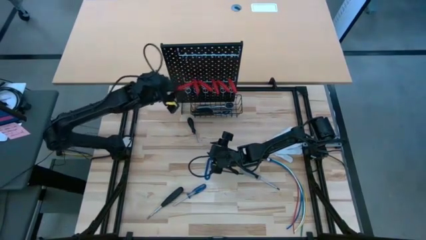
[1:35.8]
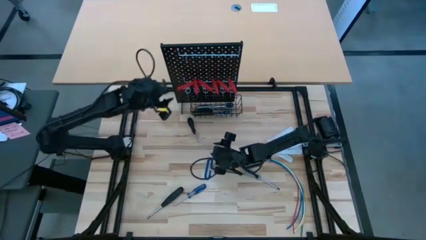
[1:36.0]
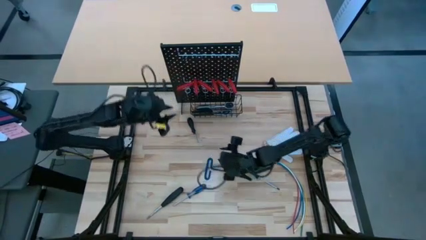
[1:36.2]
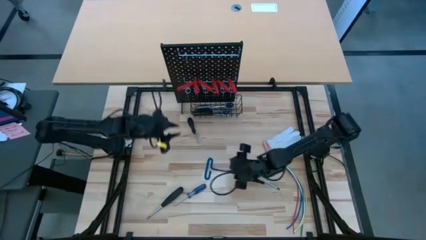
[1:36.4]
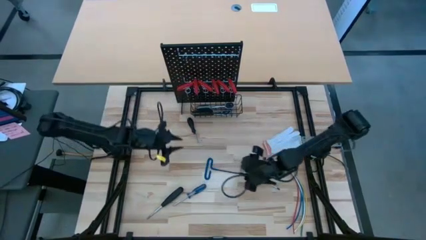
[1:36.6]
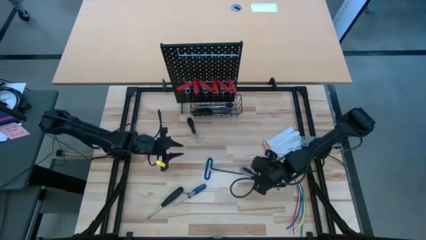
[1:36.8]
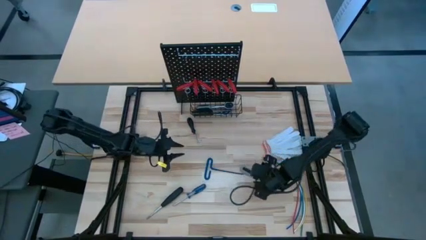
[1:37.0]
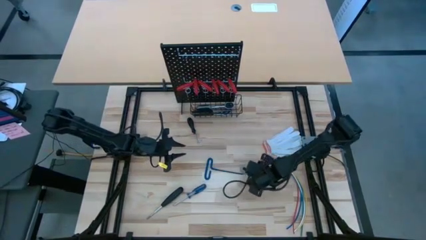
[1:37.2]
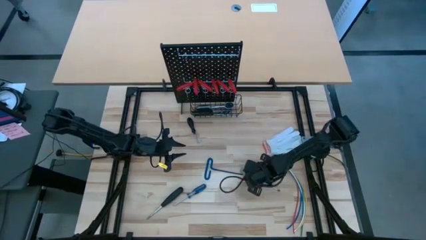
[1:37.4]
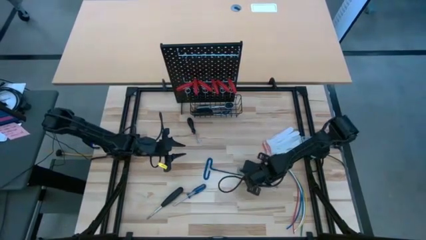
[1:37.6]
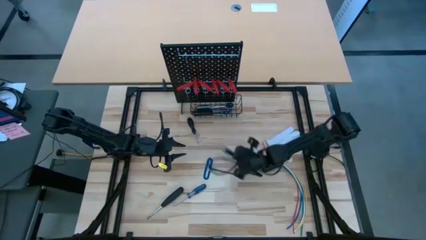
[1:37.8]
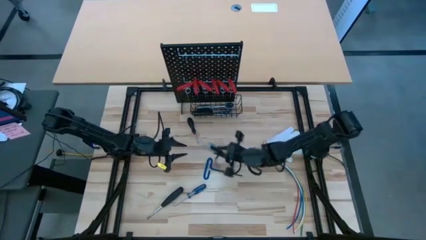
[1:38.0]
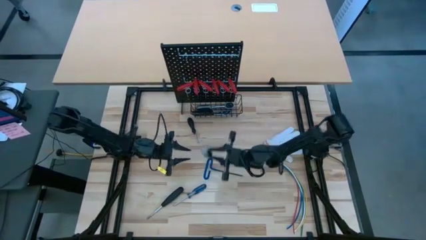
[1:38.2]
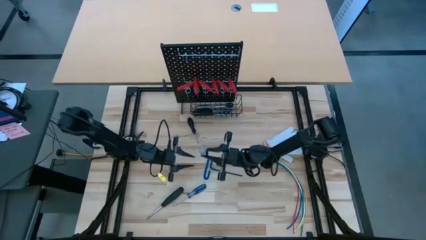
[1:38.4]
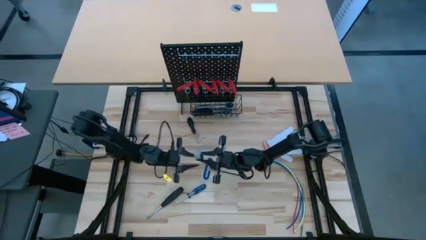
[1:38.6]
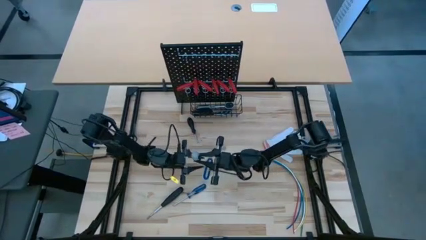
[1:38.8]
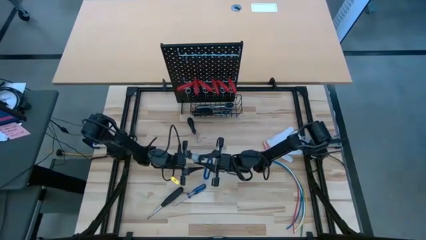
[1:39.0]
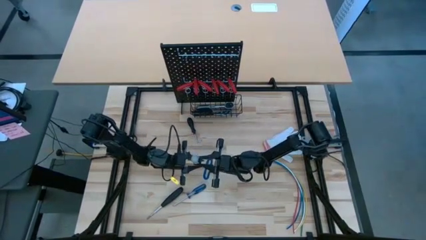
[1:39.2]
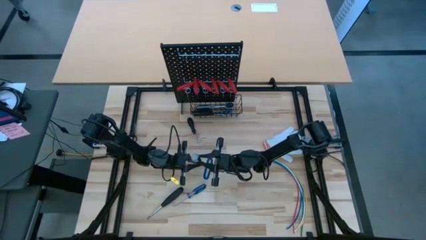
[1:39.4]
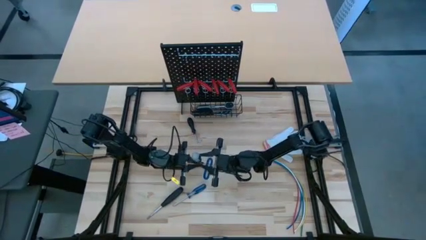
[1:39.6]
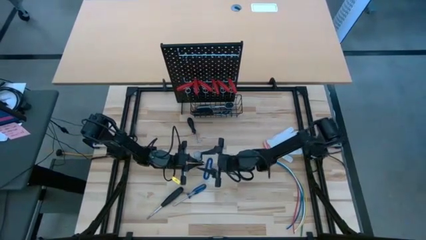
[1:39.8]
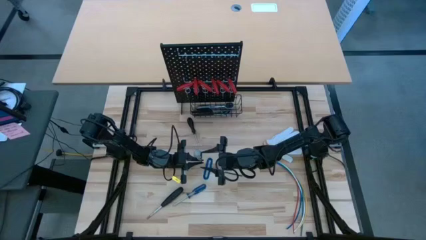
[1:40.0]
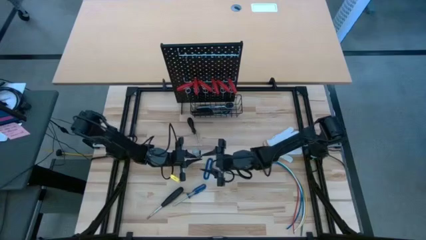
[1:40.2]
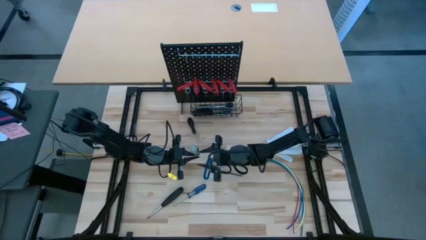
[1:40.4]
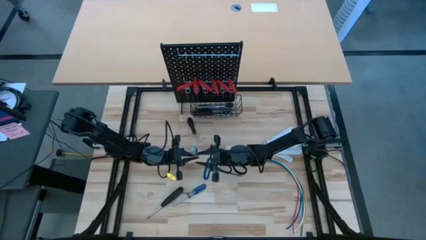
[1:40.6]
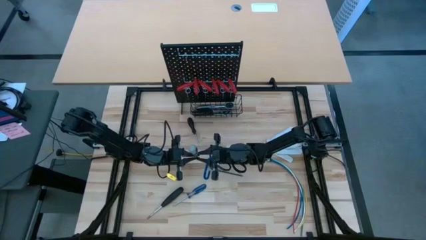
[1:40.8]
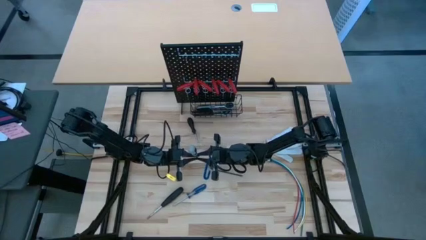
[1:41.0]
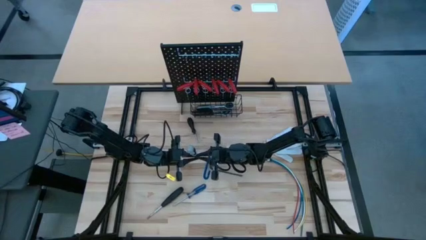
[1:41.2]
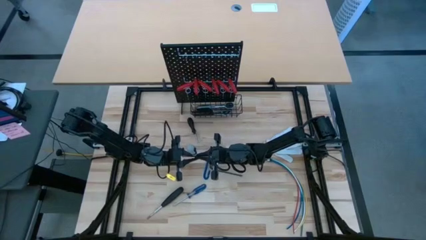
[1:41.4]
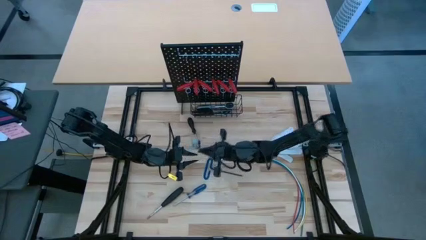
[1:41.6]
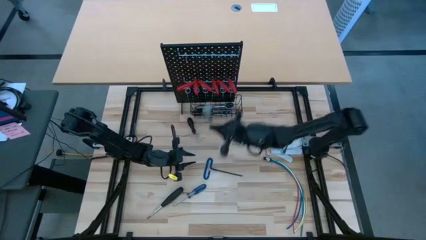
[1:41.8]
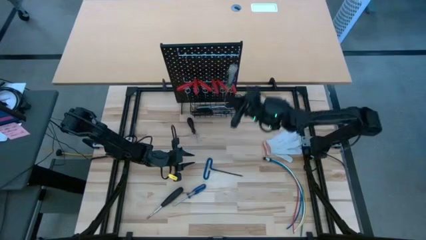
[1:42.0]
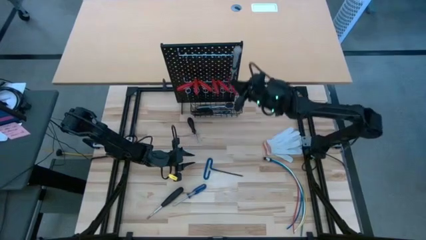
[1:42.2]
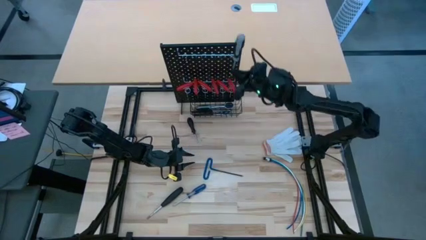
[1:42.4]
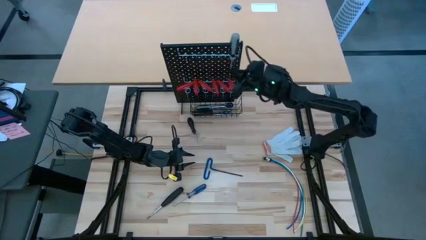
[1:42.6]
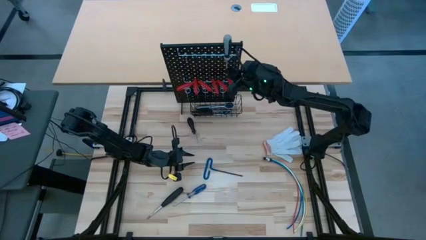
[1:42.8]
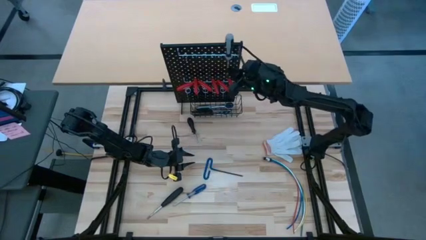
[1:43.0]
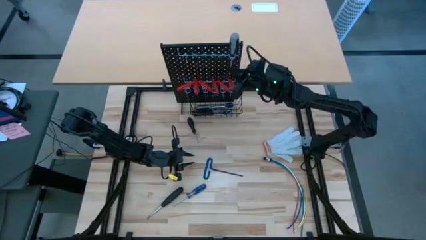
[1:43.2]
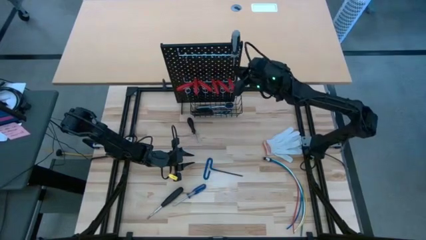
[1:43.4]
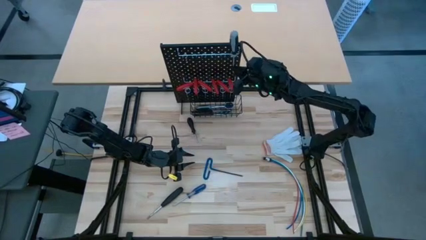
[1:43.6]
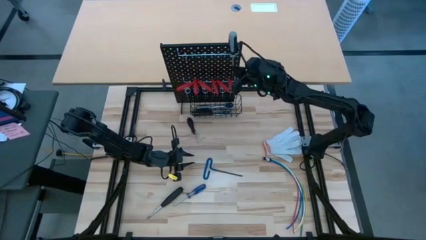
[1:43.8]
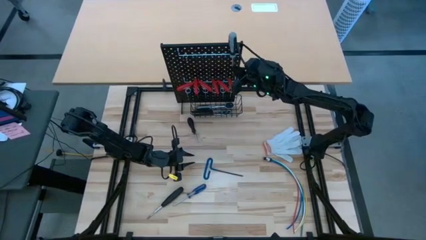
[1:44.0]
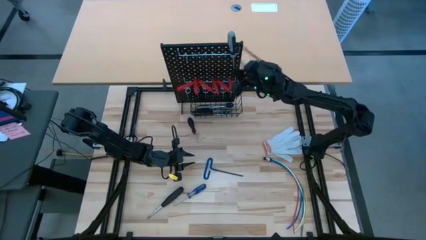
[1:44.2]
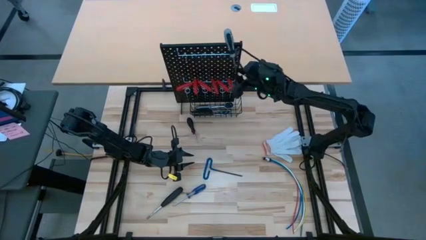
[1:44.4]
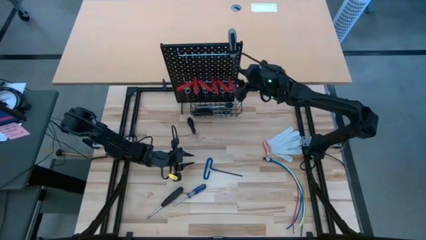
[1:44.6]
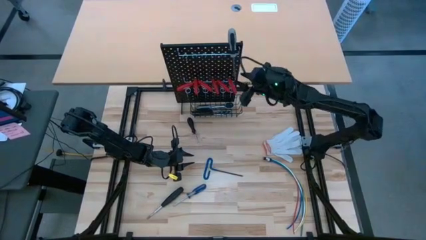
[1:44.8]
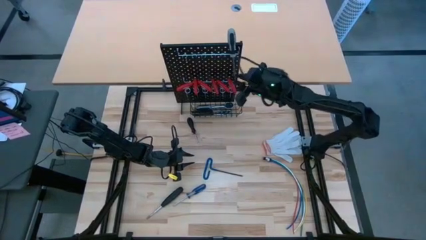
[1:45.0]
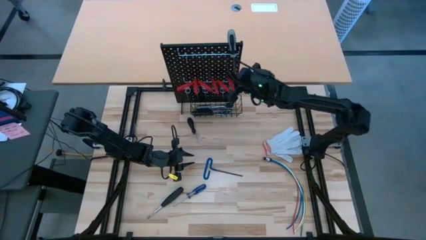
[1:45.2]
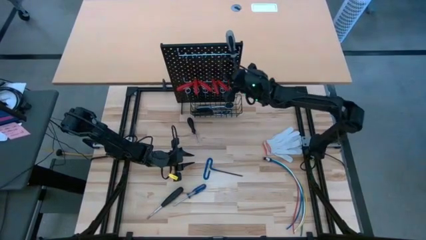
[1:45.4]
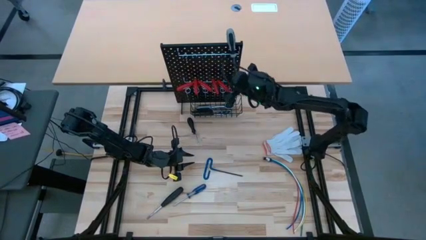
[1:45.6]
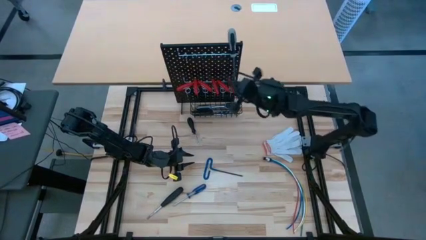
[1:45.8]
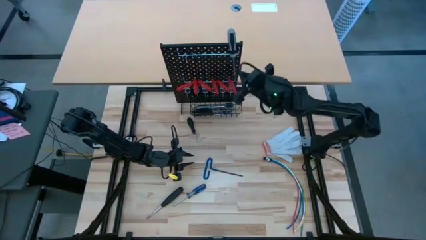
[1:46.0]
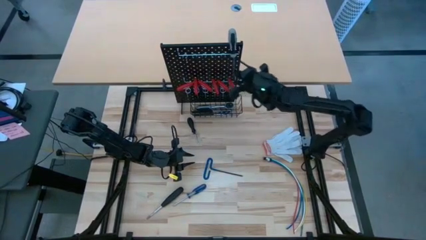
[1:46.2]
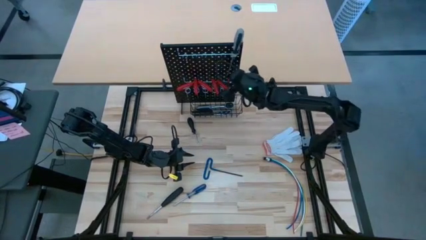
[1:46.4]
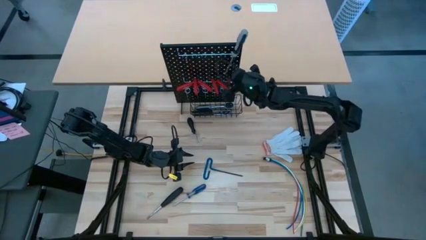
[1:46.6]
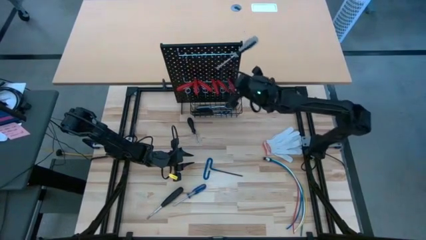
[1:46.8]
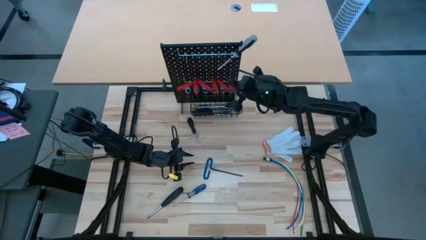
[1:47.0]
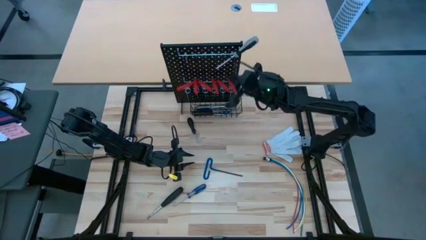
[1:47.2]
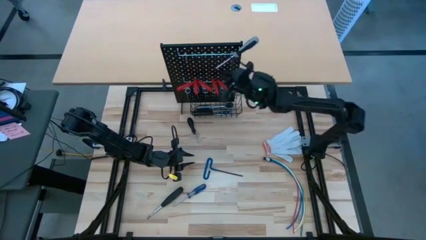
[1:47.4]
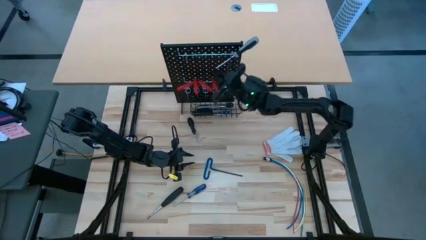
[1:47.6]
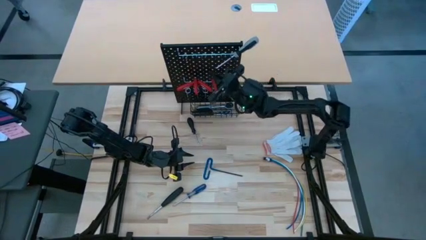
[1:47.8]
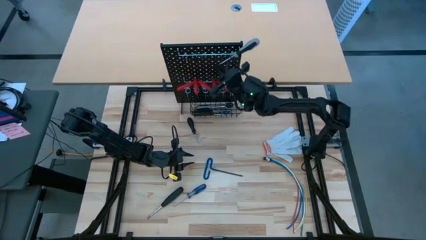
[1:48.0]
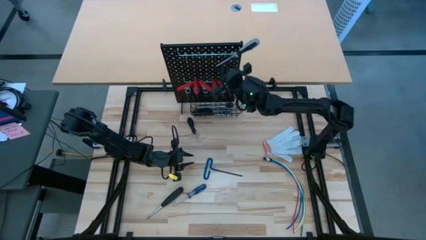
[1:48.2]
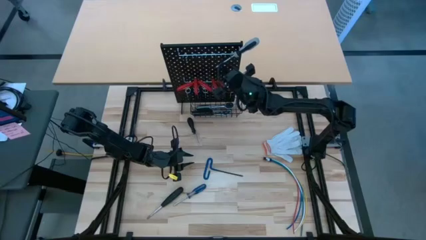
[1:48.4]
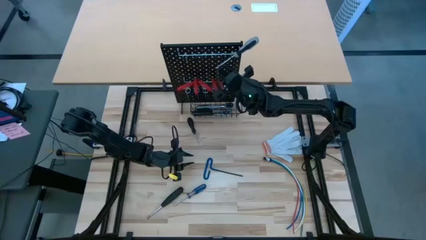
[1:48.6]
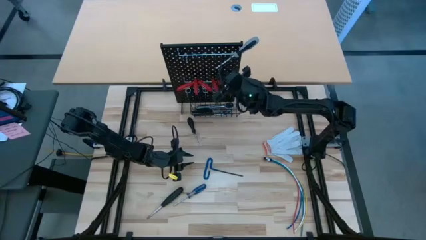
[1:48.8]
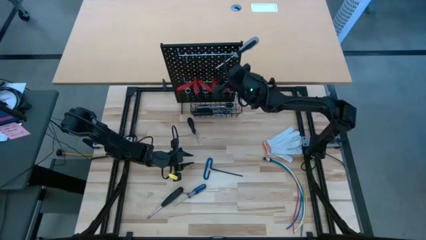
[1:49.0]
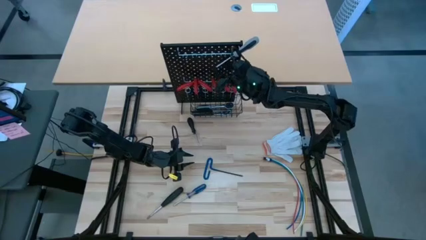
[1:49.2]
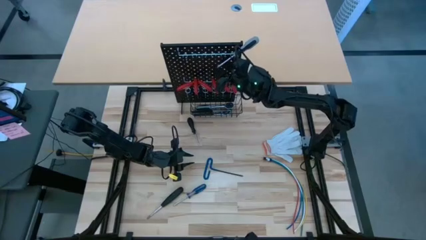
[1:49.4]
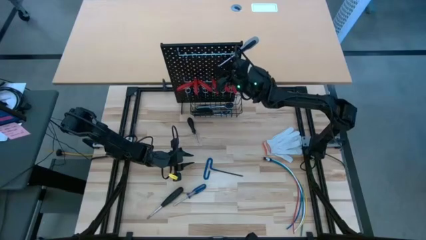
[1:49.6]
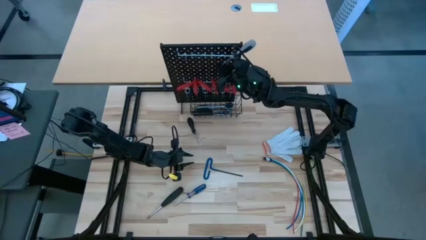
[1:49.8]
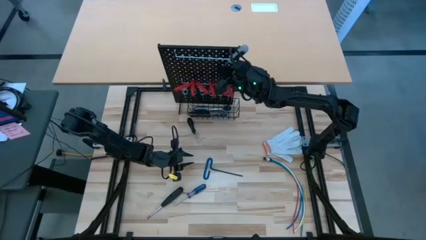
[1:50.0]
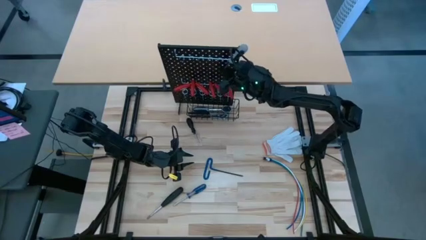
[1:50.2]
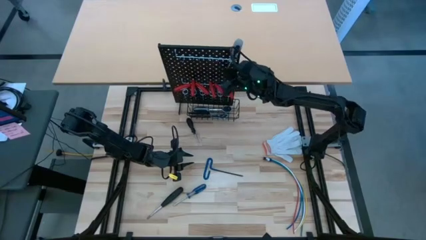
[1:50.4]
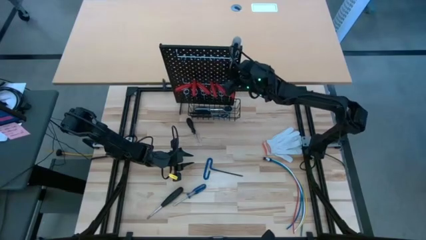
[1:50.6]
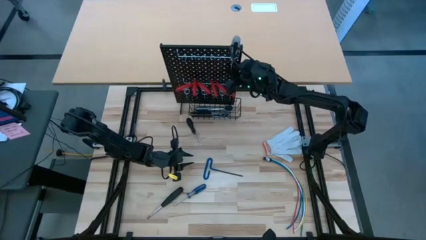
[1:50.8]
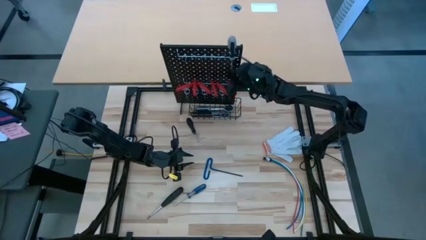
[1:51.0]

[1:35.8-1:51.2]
Task: Hang tools onto peg board
Hang the gray screwdriver on the pegboard
